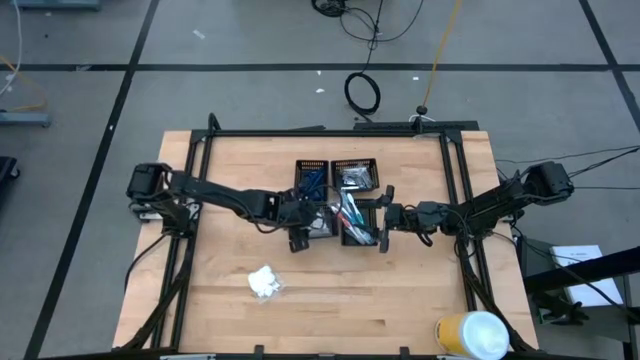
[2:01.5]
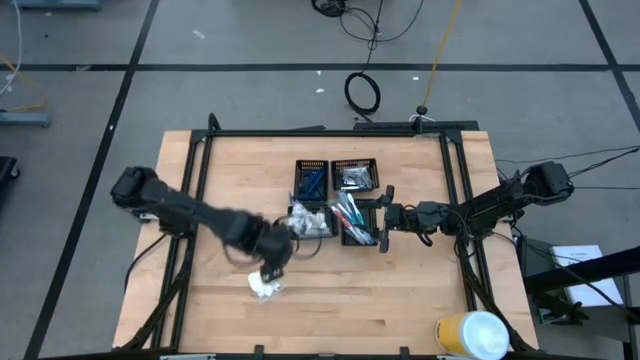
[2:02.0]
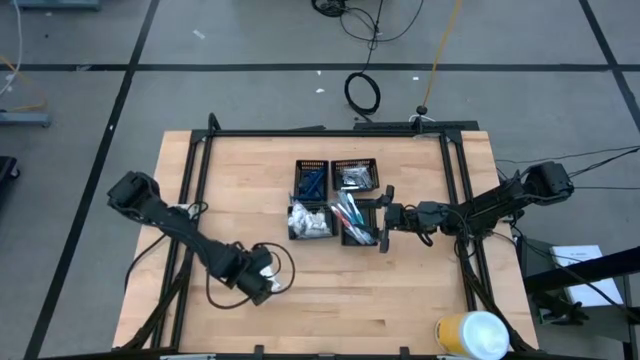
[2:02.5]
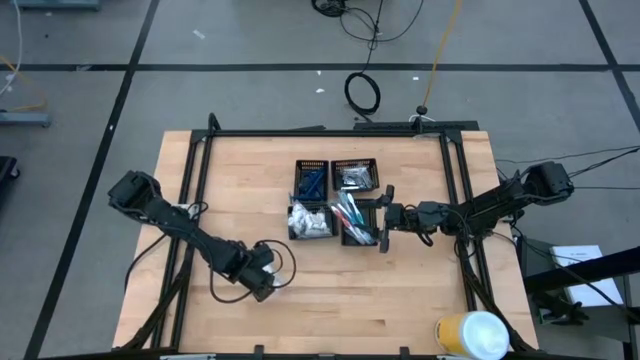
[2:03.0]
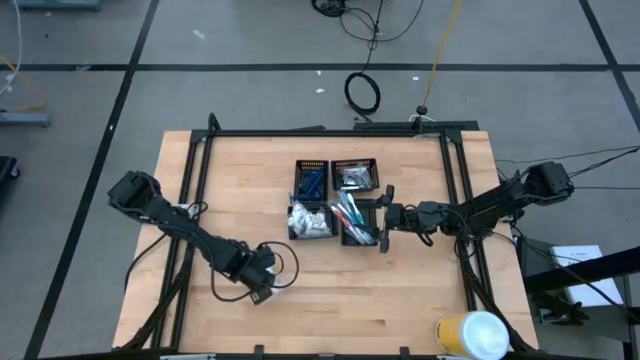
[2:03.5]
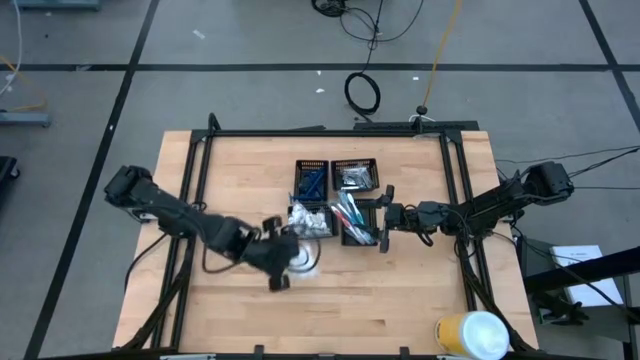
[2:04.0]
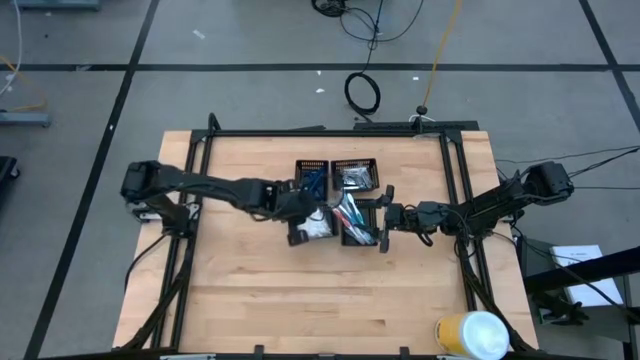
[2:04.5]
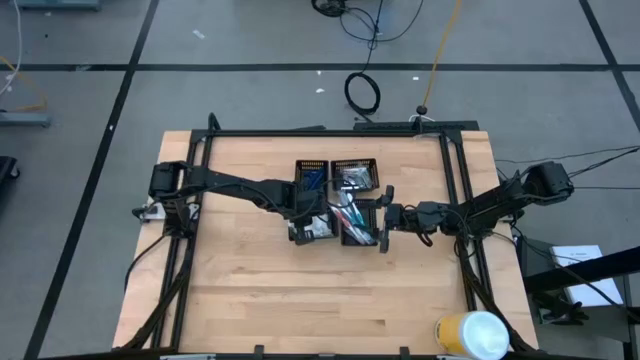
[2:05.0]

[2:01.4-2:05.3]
Task: Pick & Place Travel size toiletries
Put the white cotton pack into the bottom left black bin

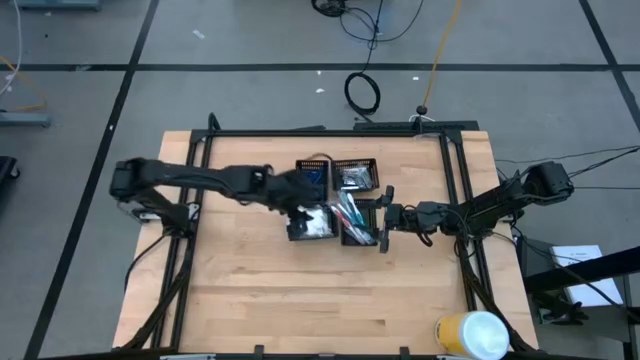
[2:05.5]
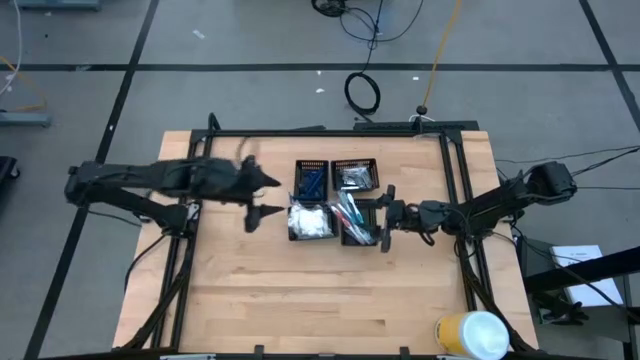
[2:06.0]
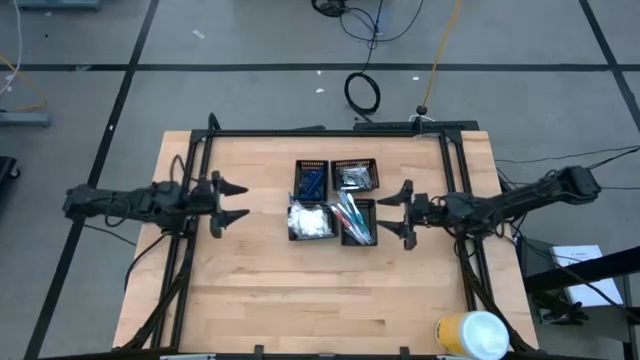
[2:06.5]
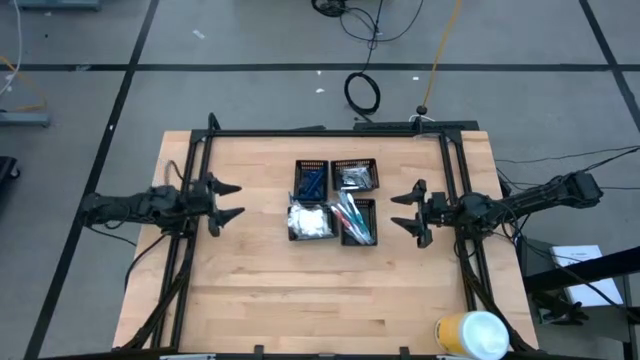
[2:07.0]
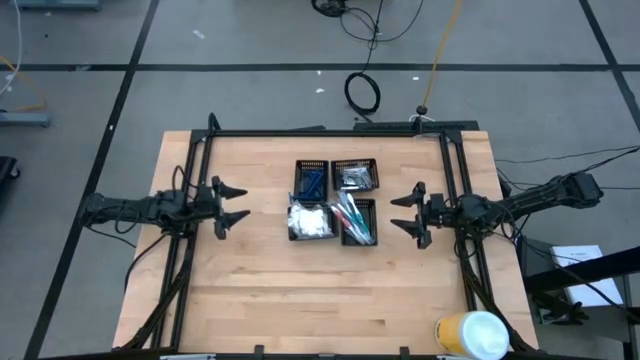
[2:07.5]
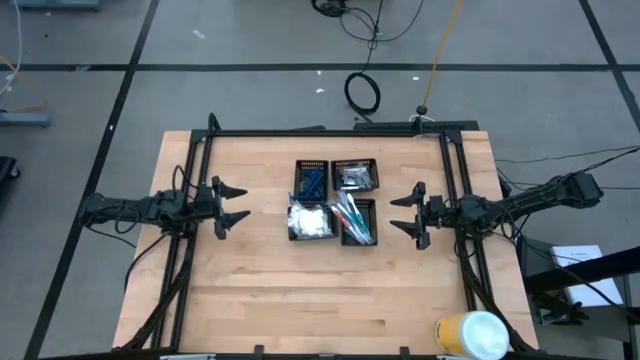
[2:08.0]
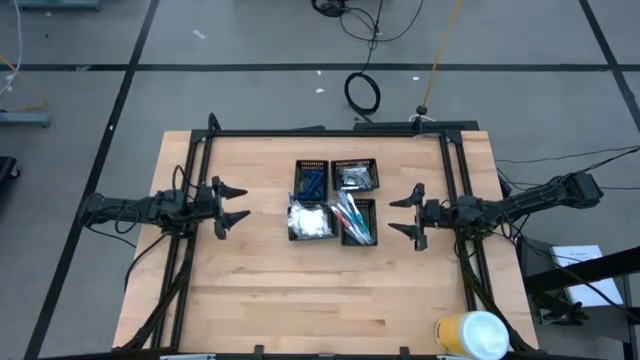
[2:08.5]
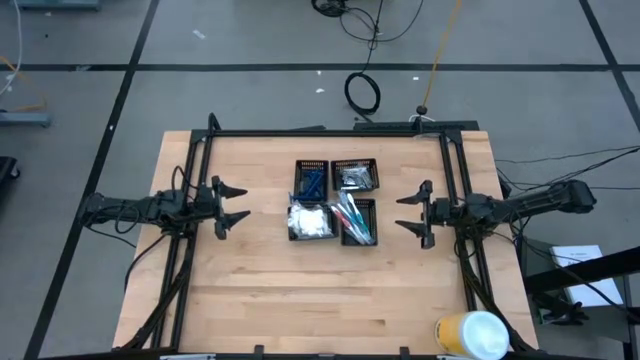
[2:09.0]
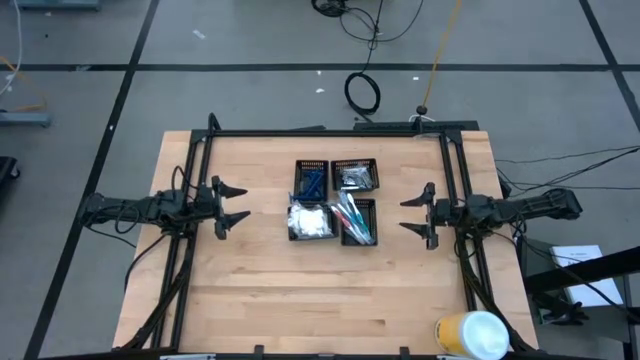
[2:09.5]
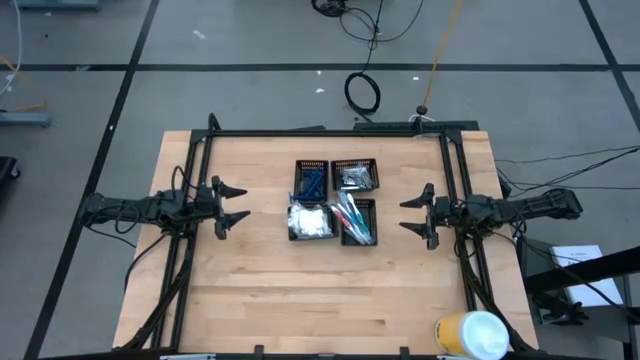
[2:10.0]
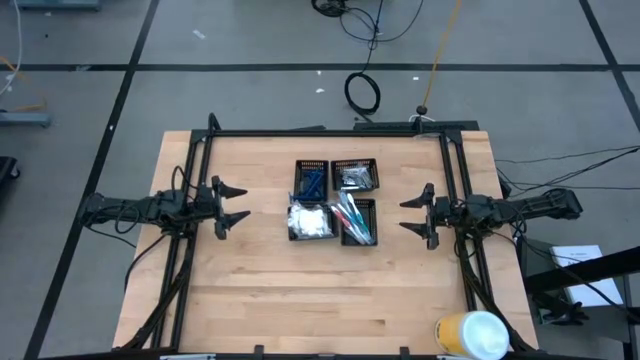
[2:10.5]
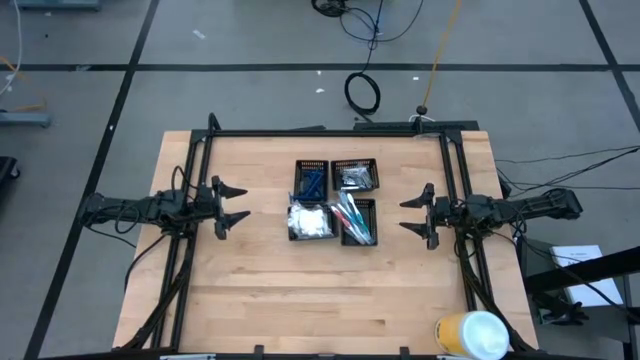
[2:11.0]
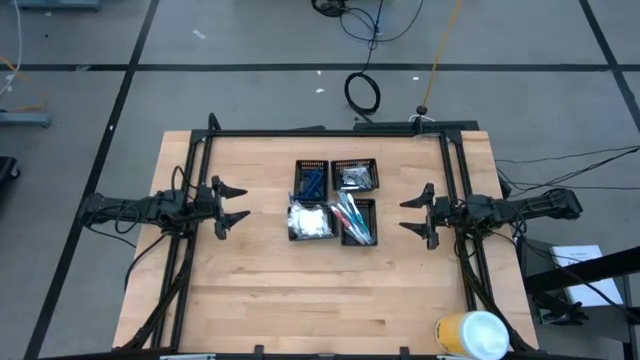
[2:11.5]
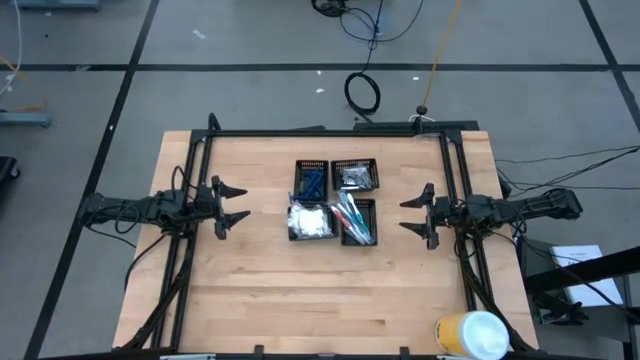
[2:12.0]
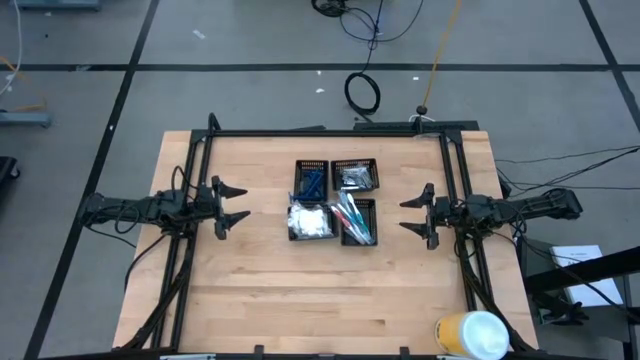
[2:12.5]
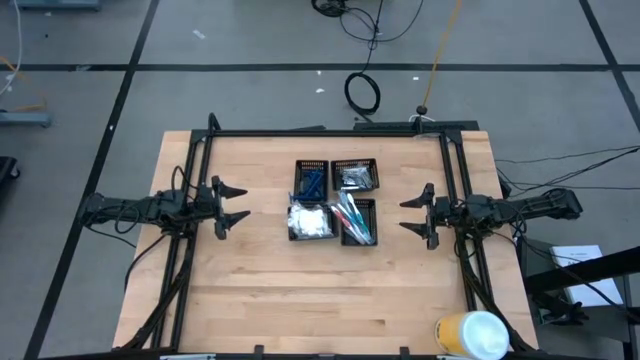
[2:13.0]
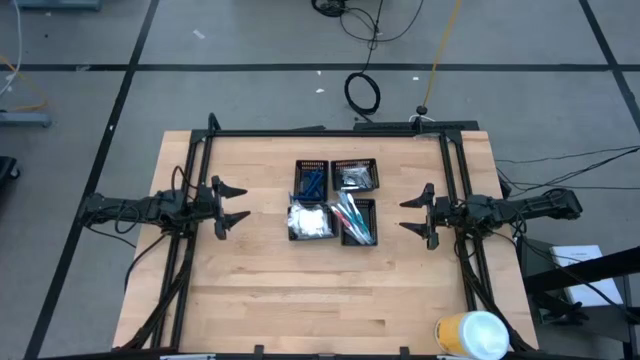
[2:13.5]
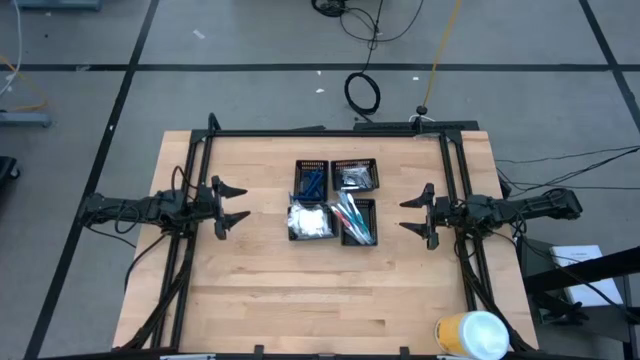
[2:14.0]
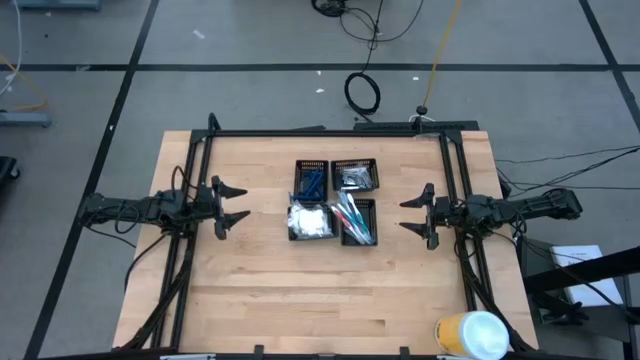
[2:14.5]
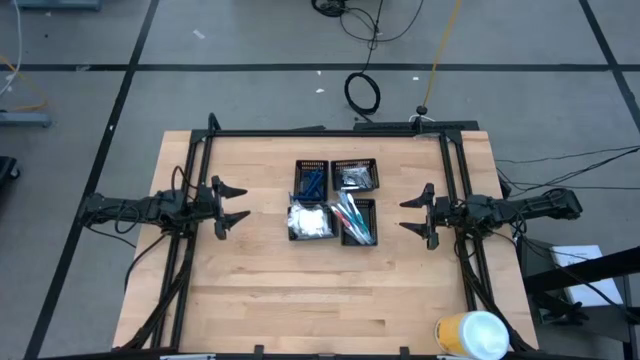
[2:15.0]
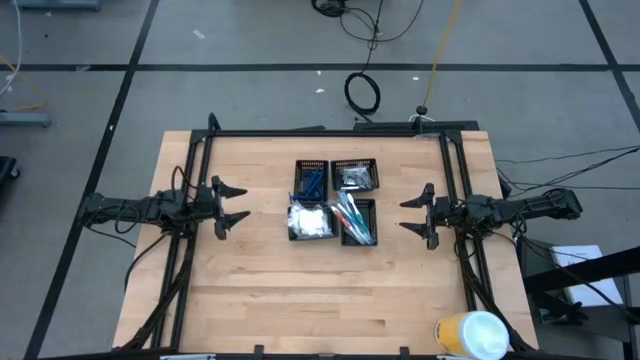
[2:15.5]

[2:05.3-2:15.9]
Return to Home Position

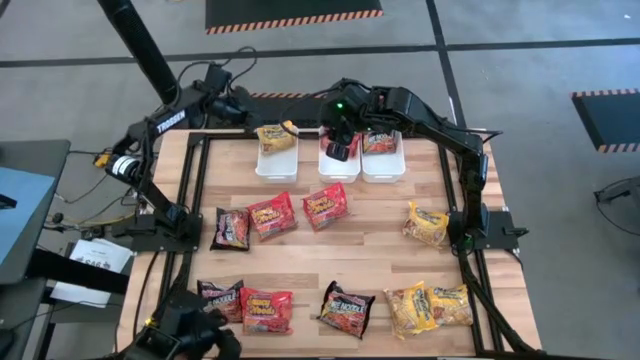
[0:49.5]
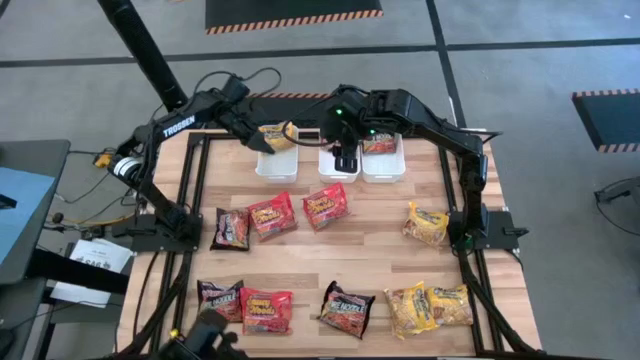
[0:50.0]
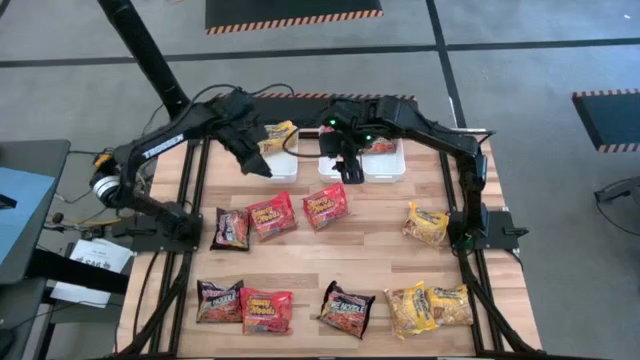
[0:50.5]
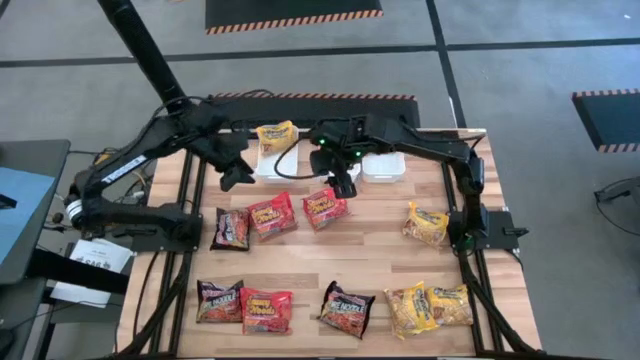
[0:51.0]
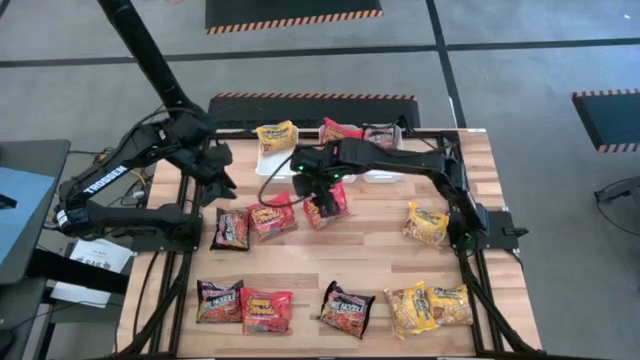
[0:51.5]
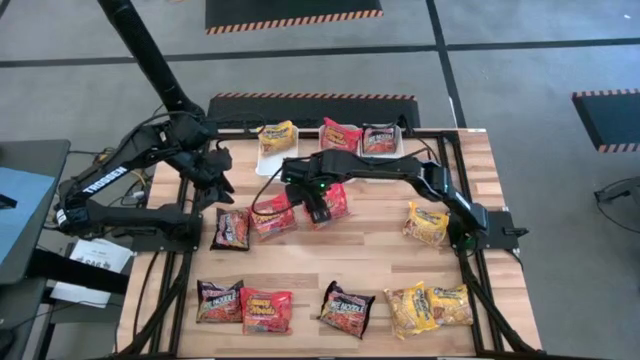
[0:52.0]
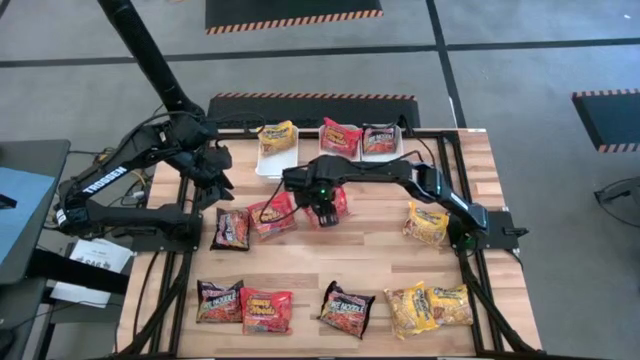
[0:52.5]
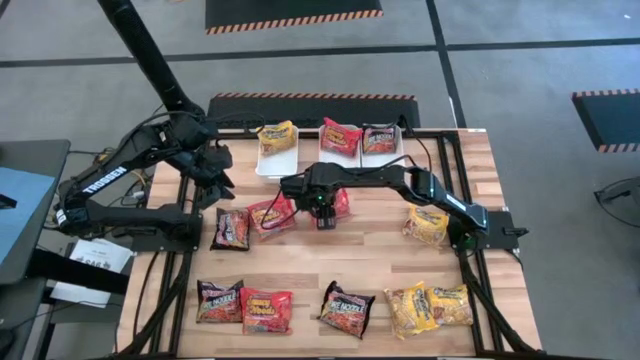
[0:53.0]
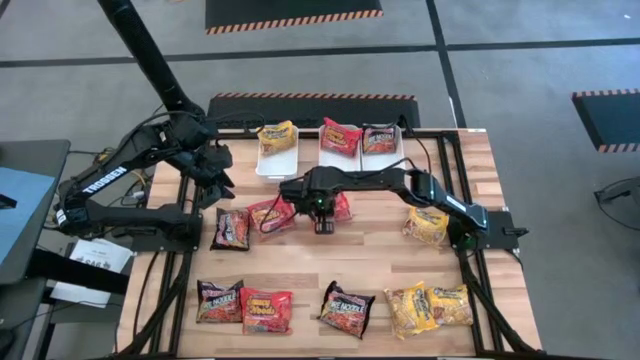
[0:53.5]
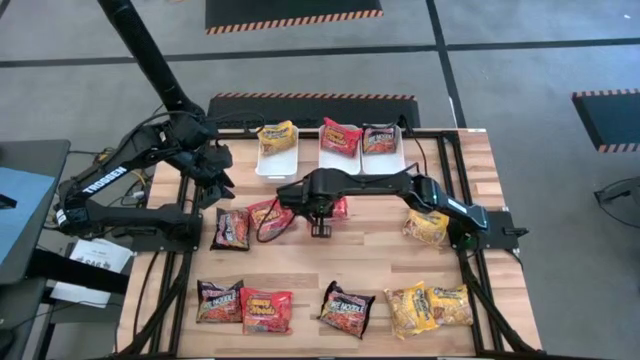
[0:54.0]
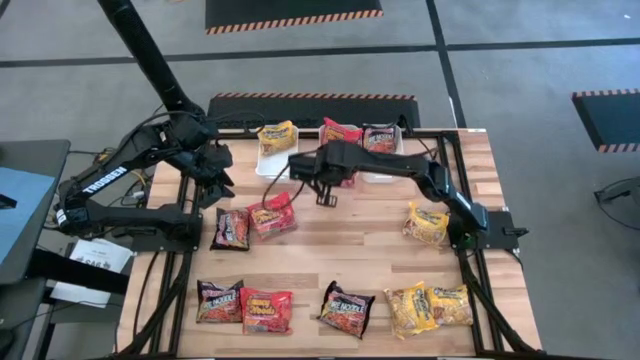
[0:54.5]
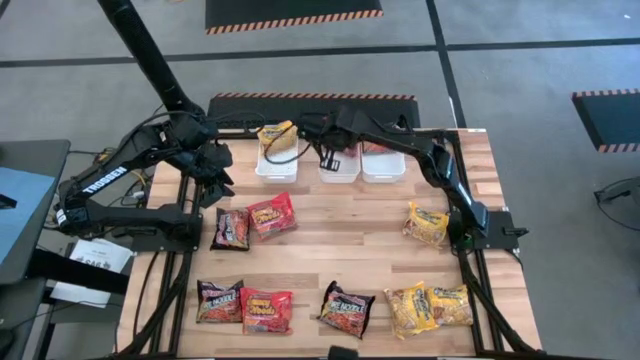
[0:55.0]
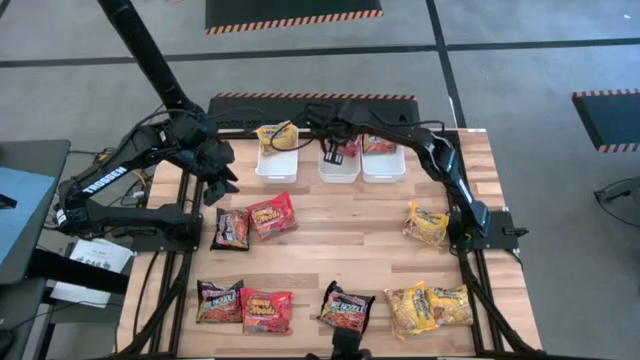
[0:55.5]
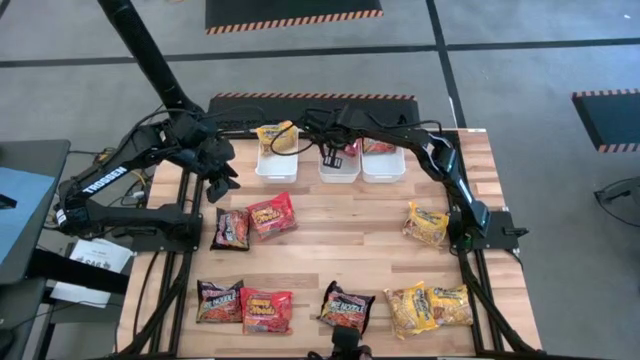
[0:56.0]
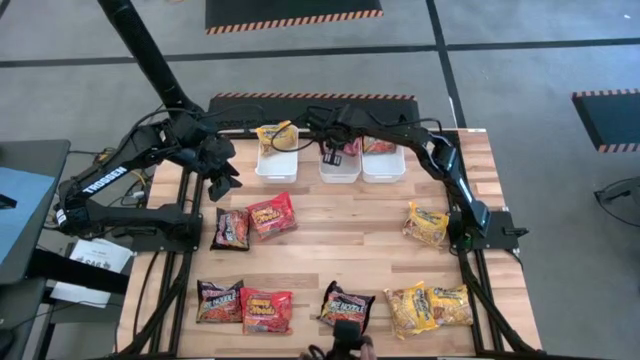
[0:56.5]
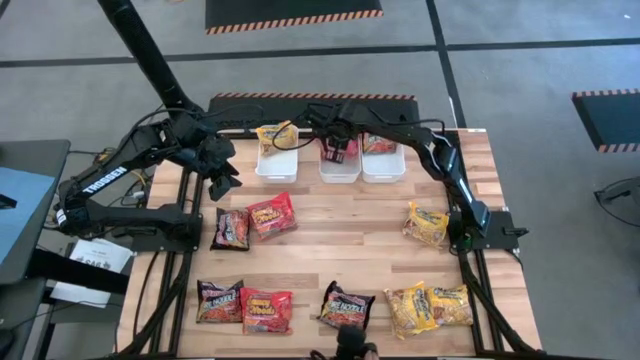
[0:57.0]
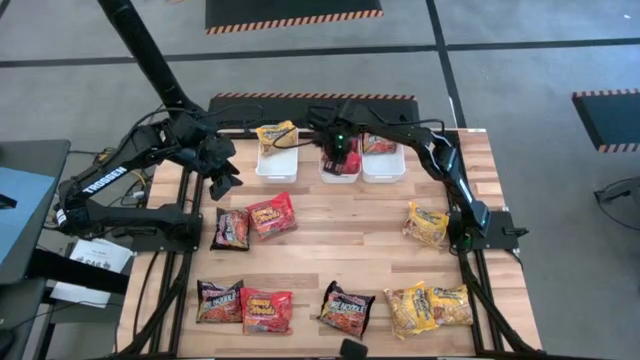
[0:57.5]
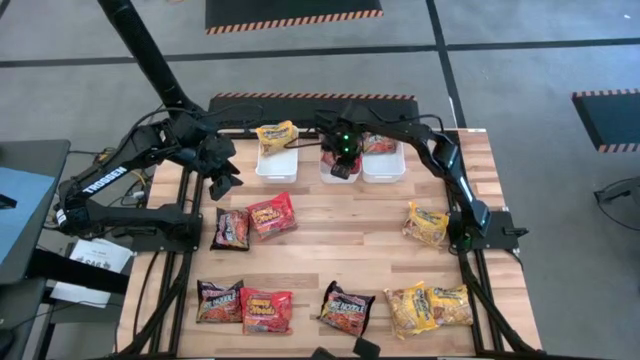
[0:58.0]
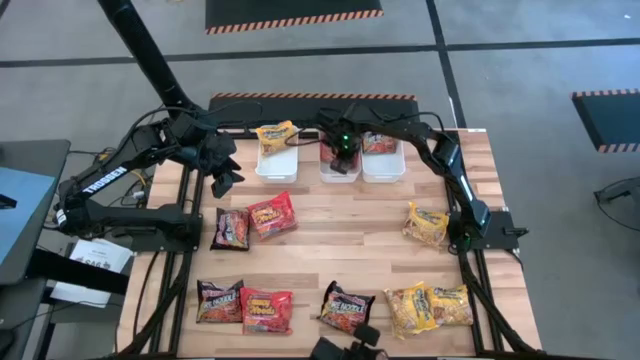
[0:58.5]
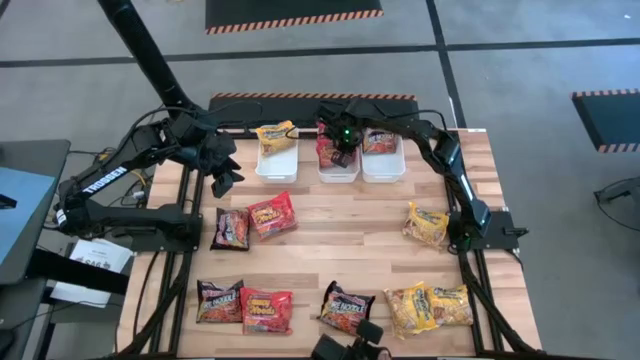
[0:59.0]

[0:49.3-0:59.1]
Task: Sort Maruchan noodles
Put the orange noodle pack into the middle white bin
